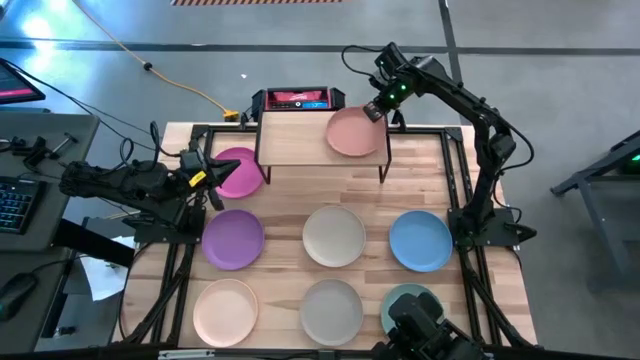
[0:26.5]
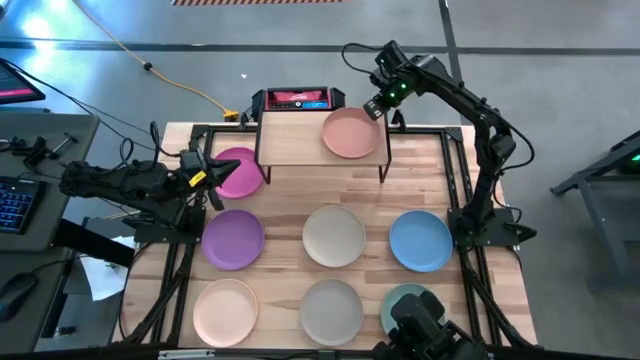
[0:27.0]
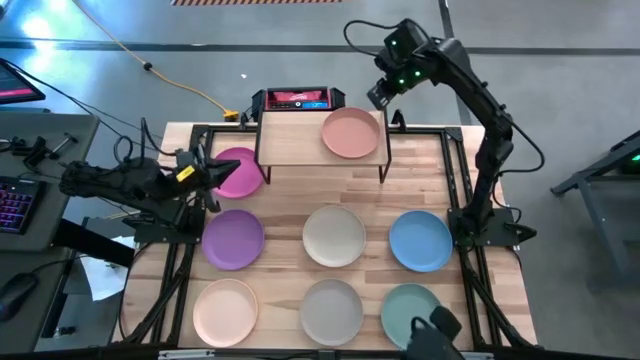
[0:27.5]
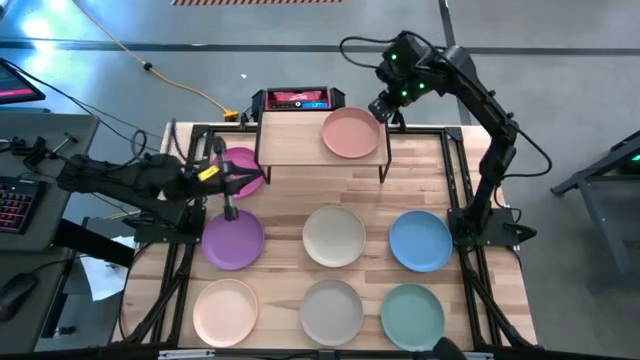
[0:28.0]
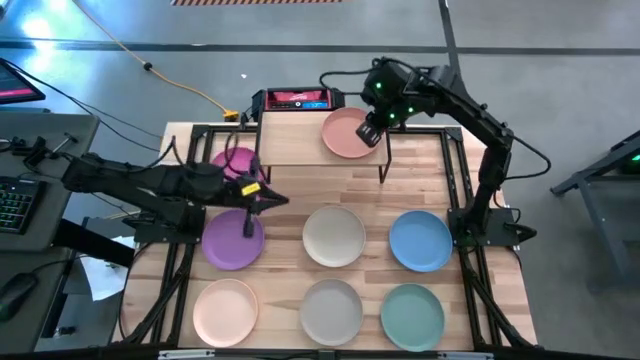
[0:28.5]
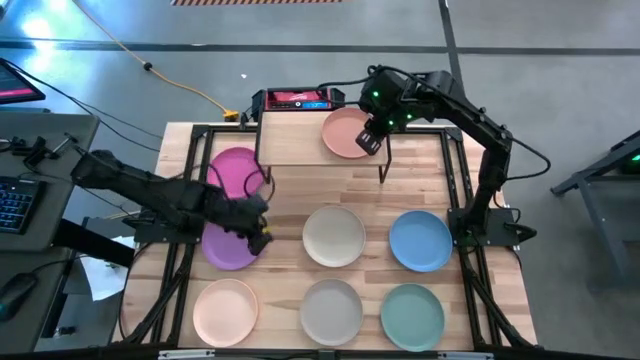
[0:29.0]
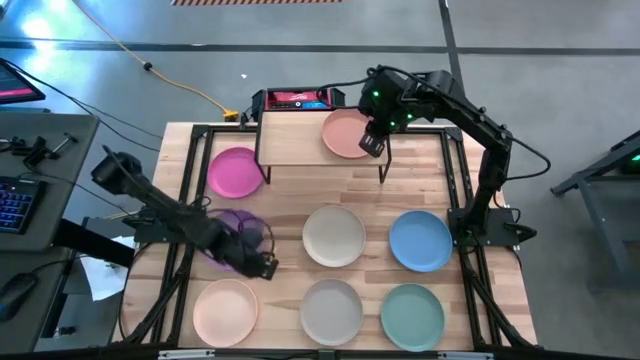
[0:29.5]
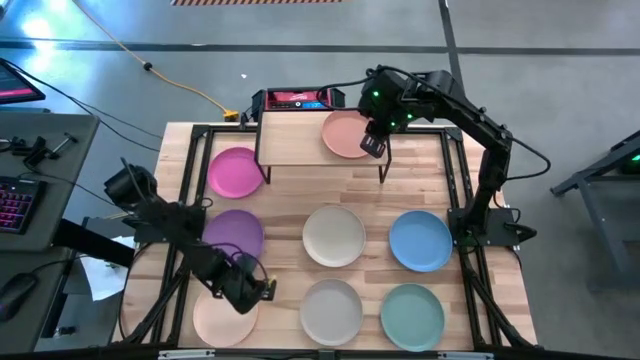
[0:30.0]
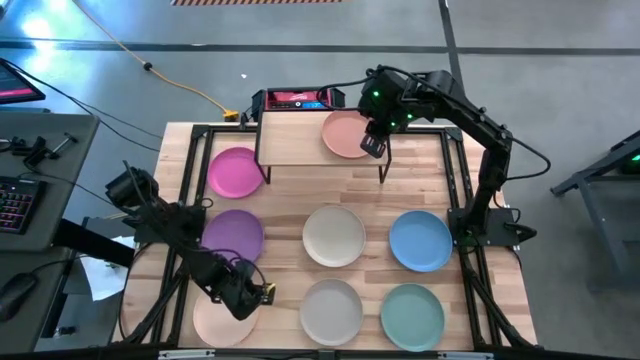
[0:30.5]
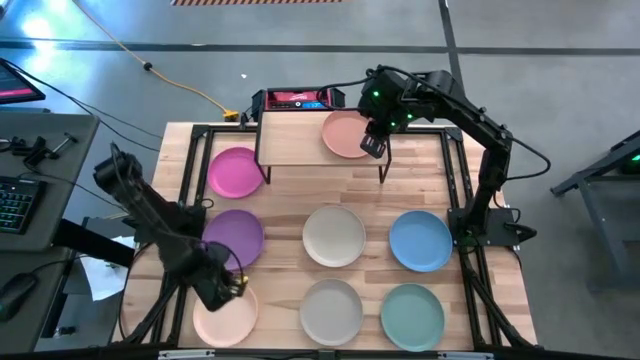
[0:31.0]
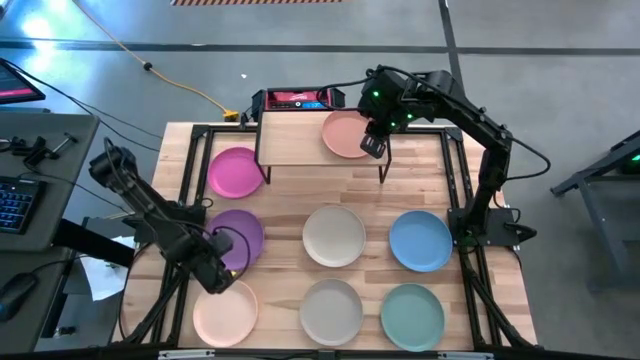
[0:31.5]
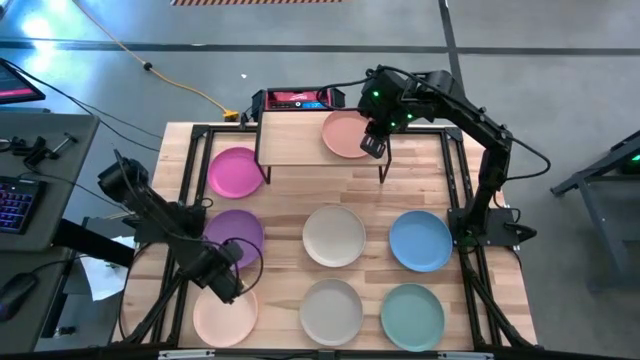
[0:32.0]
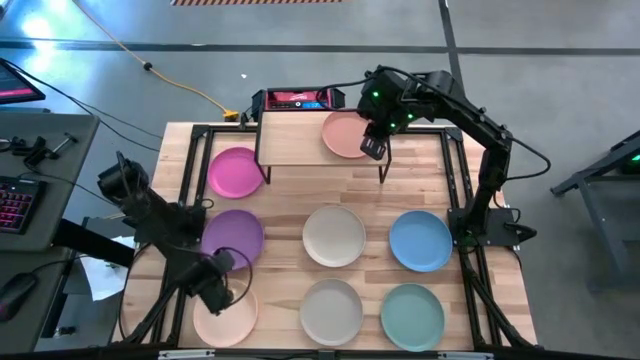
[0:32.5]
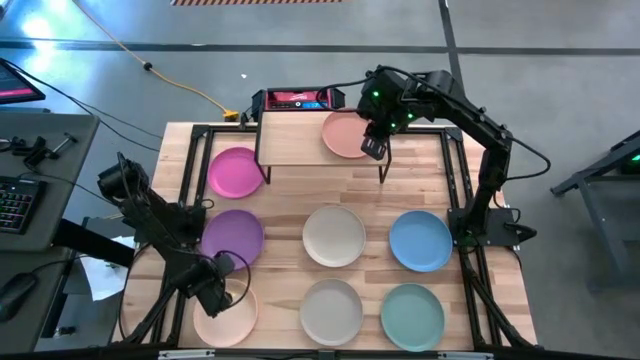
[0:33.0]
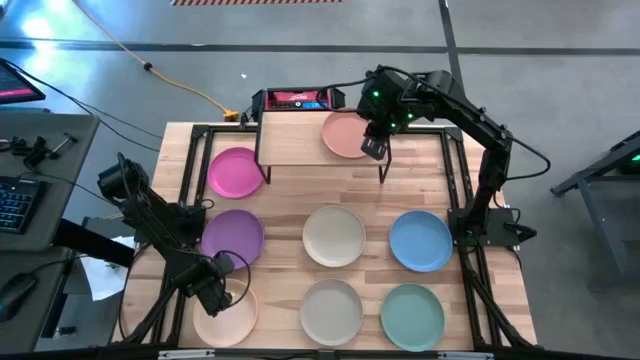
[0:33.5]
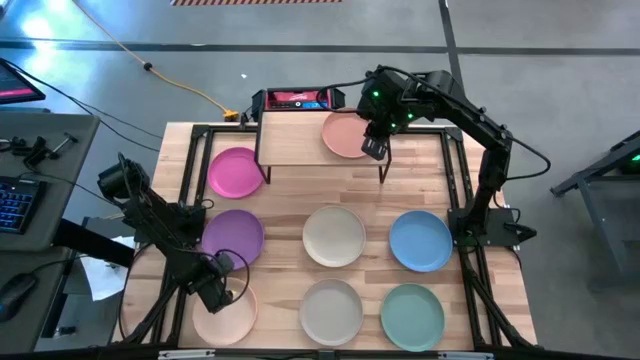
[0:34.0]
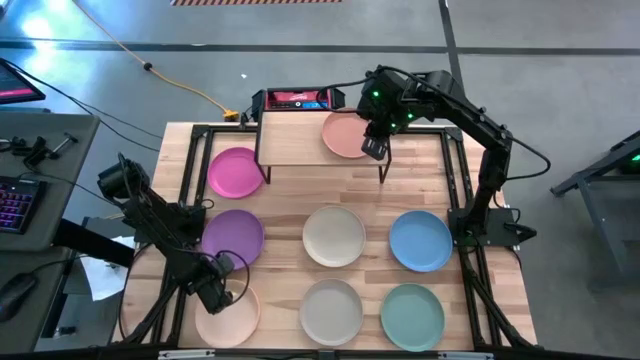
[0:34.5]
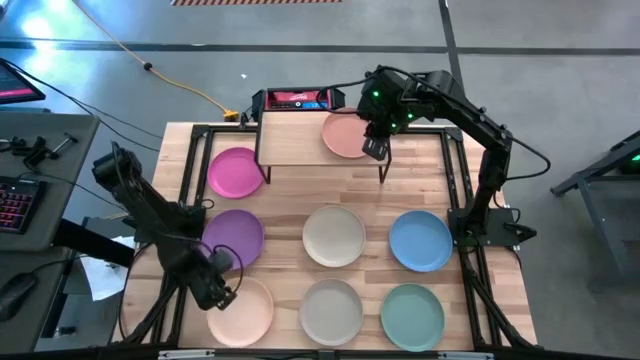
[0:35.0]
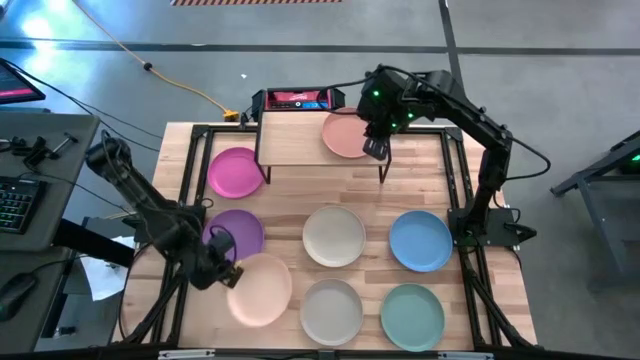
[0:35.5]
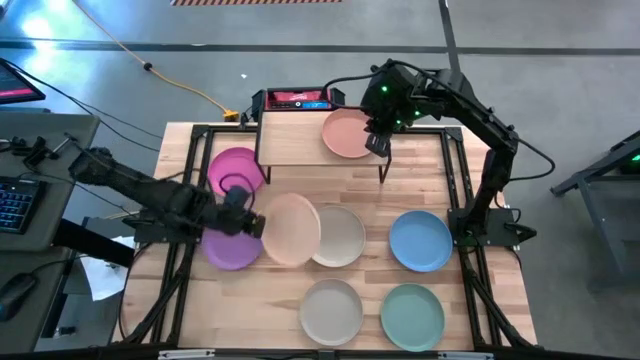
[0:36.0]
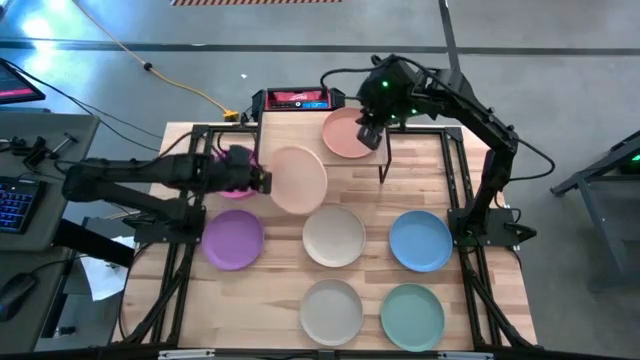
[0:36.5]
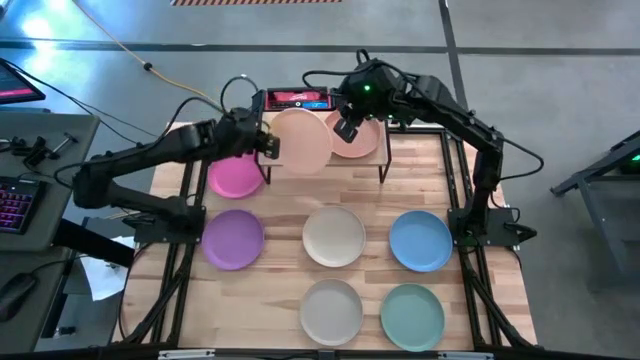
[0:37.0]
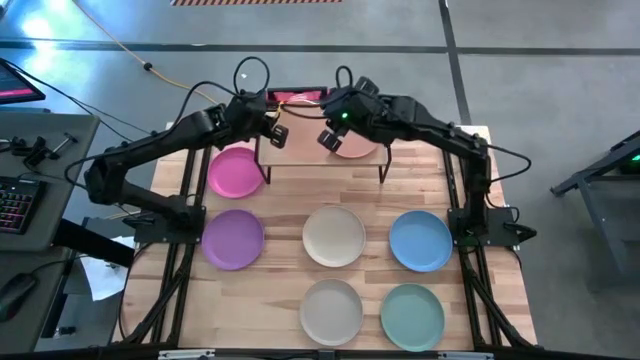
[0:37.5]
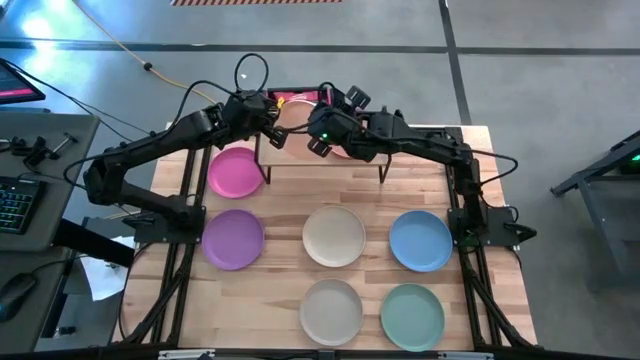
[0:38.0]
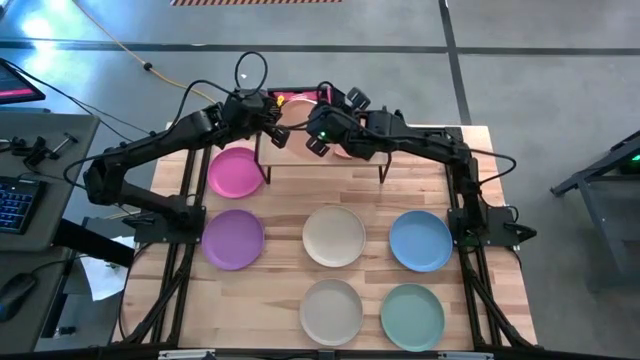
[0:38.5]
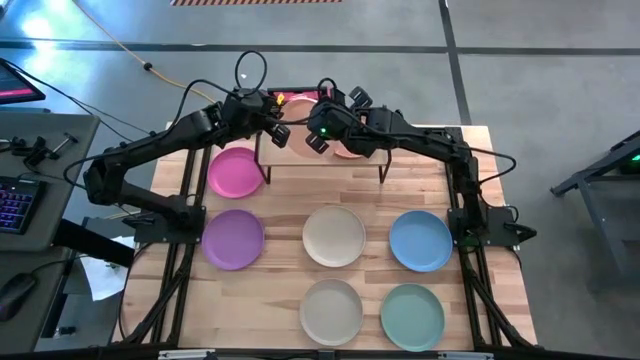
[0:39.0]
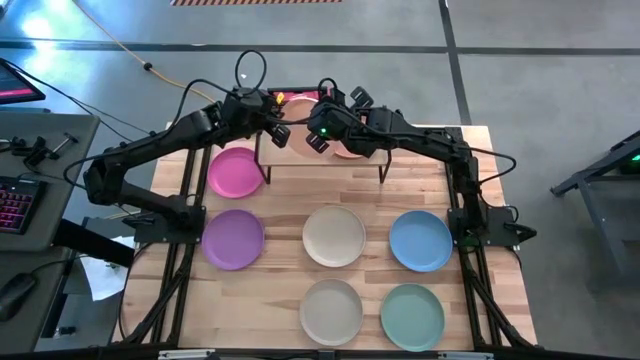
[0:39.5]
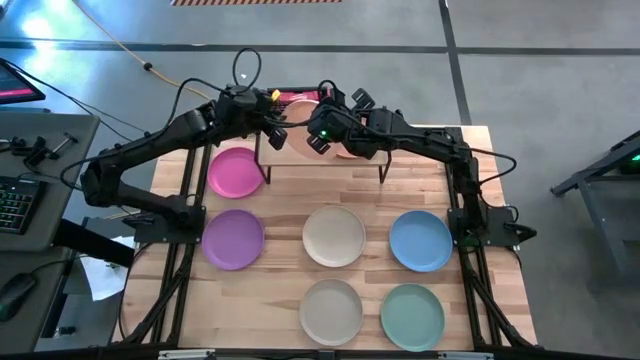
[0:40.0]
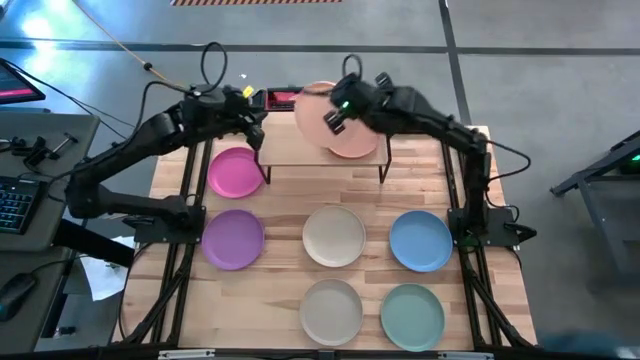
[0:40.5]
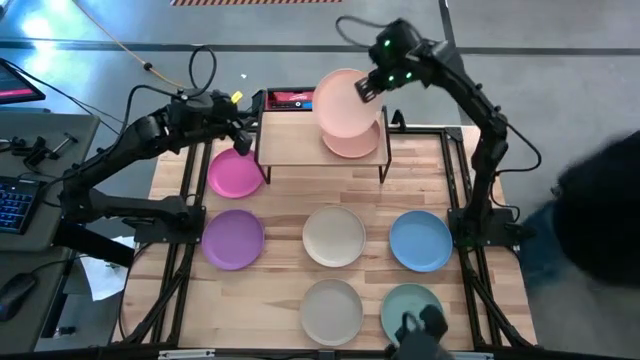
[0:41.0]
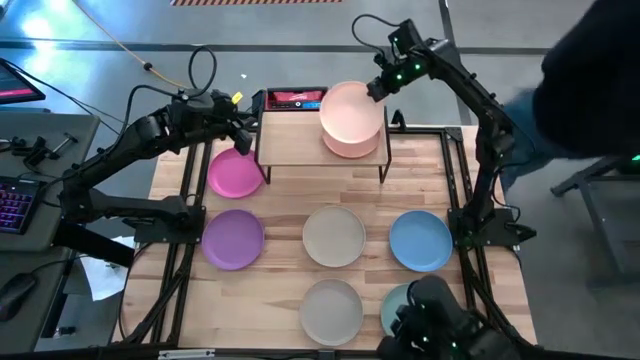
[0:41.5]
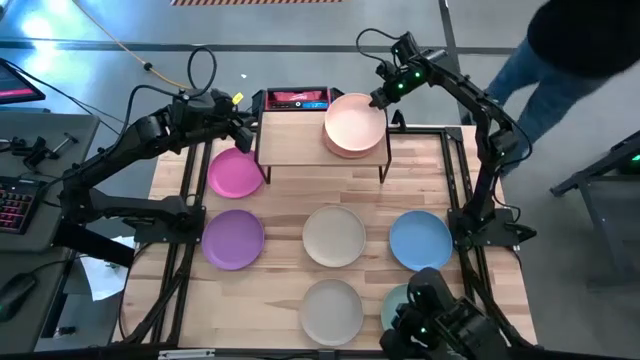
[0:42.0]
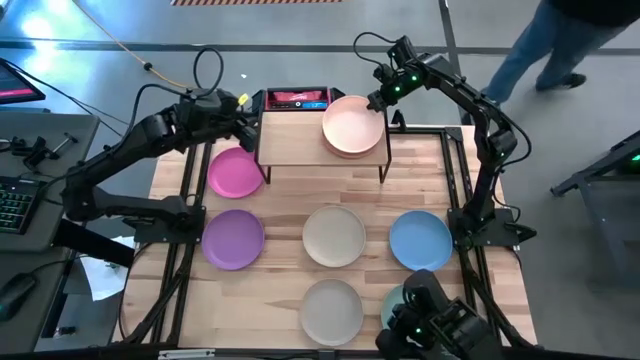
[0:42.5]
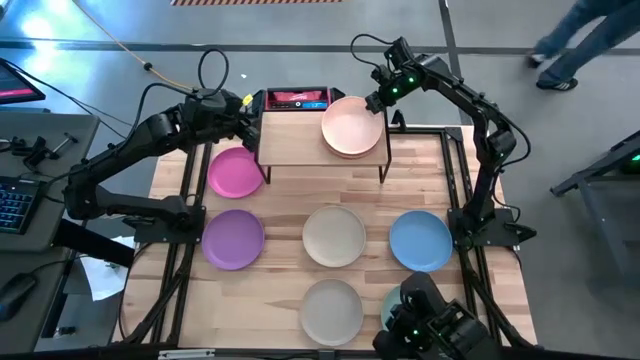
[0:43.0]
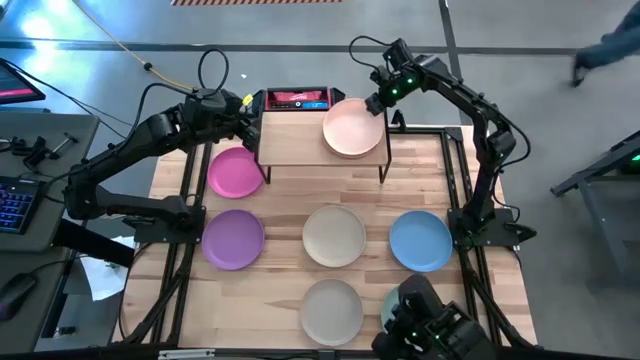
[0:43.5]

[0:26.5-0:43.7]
Task: Place and stack plates onto a shelf
Stack the light brown plate on top of the brown plate on the shelf

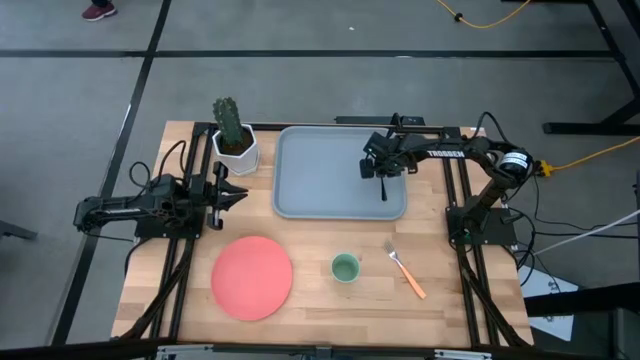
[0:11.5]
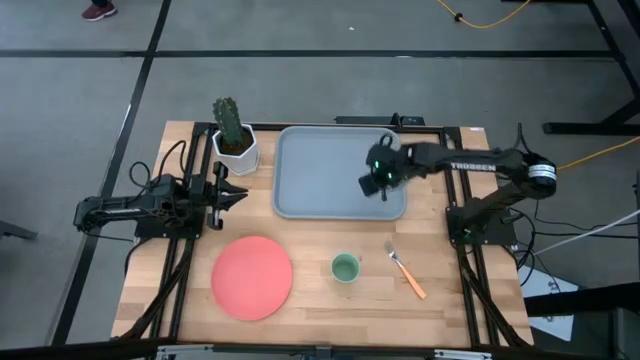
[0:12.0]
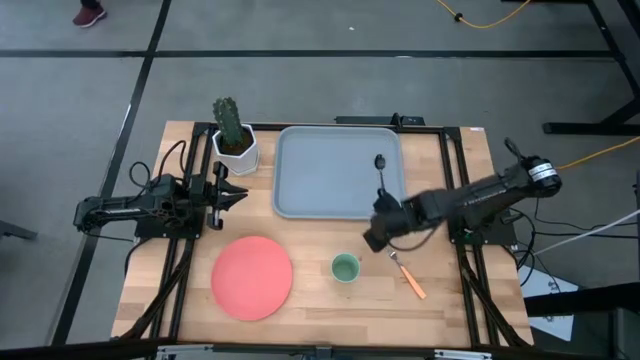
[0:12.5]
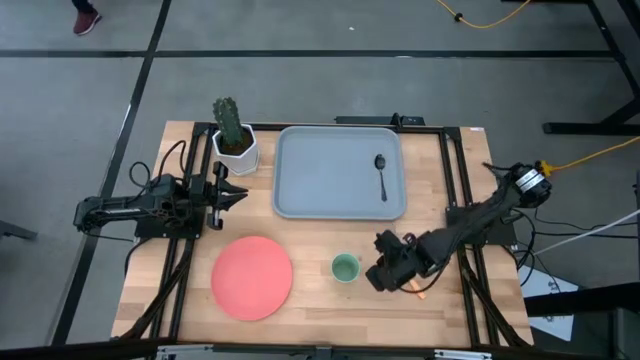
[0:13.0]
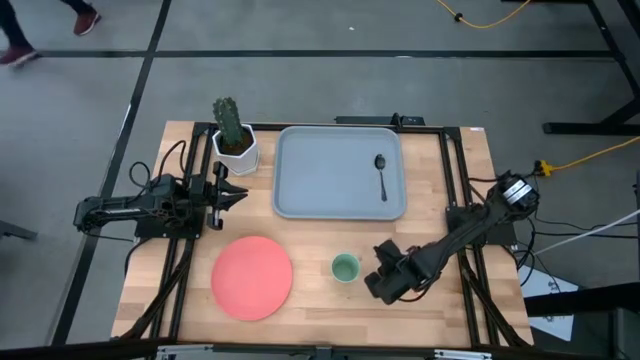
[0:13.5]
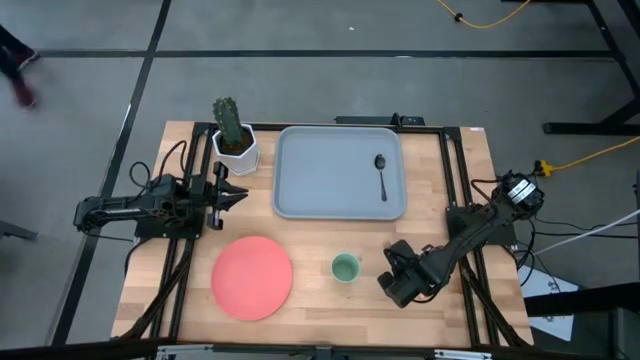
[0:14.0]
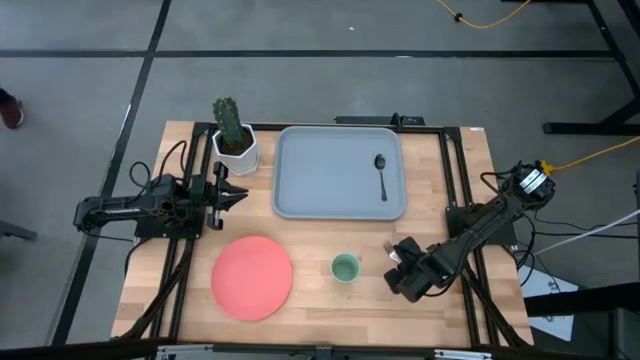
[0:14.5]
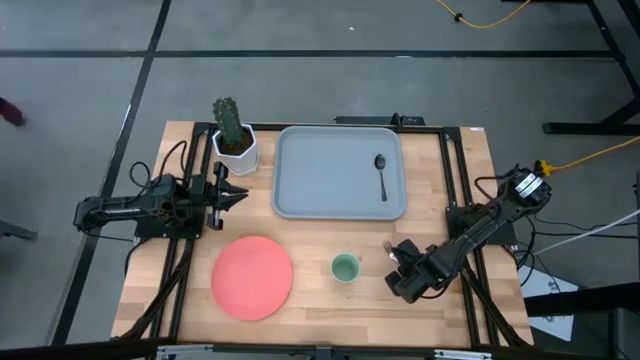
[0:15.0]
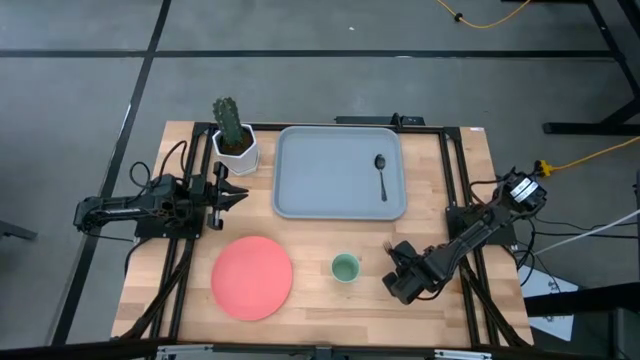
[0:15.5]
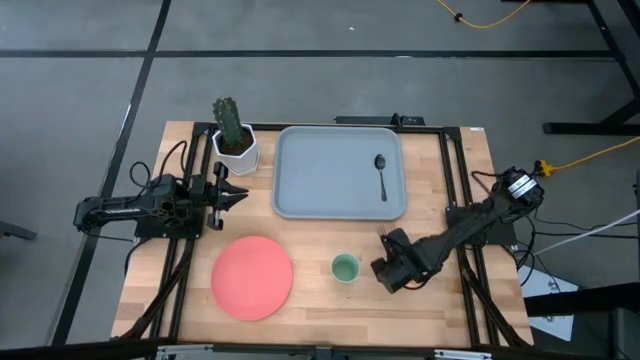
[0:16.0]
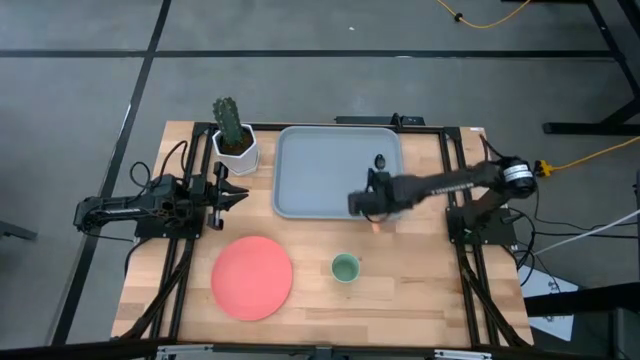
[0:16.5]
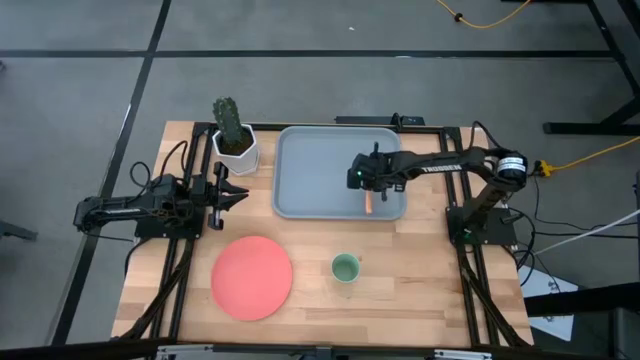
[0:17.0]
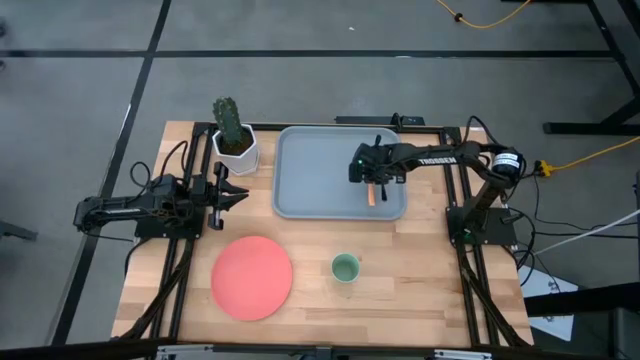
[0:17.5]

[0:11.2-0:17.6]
Task: Pick and place plate/cup/fork/spoon on tray
Put the orange fork on the gray serving tray to the right of the black spoon
